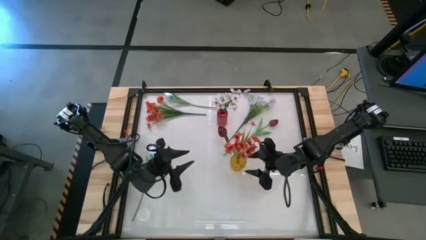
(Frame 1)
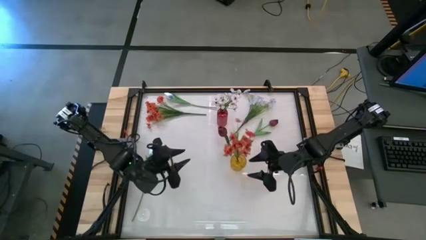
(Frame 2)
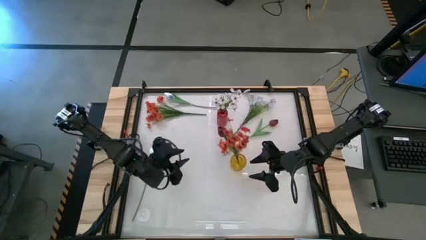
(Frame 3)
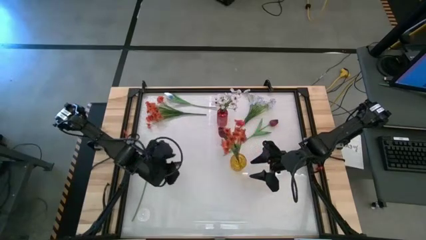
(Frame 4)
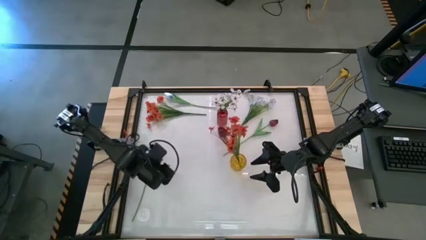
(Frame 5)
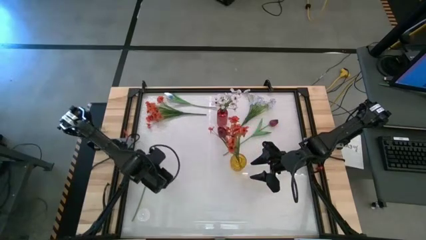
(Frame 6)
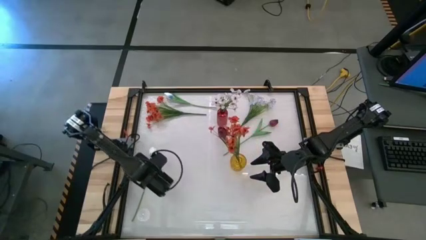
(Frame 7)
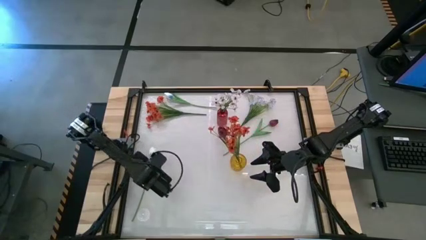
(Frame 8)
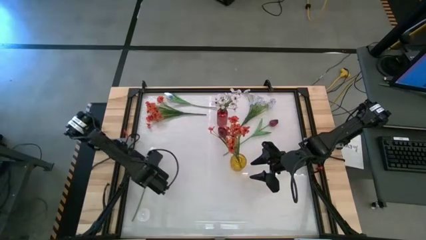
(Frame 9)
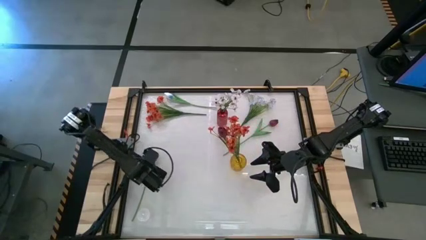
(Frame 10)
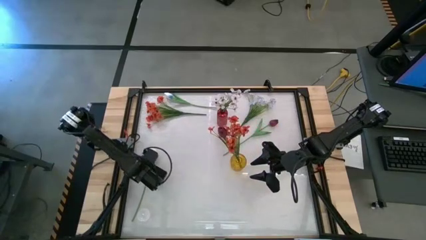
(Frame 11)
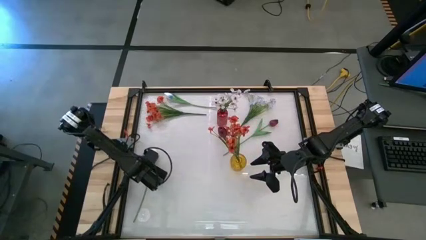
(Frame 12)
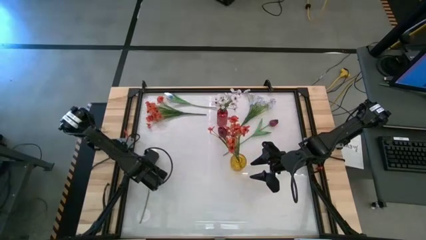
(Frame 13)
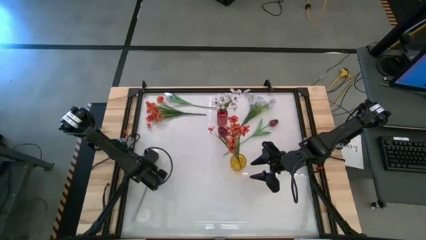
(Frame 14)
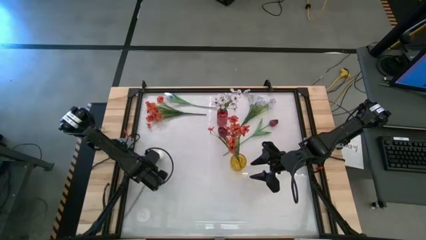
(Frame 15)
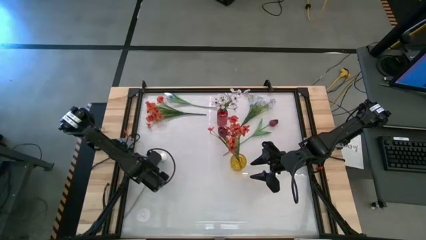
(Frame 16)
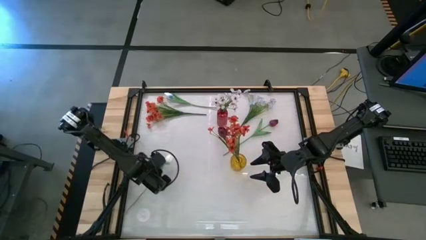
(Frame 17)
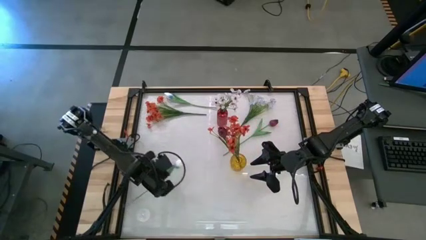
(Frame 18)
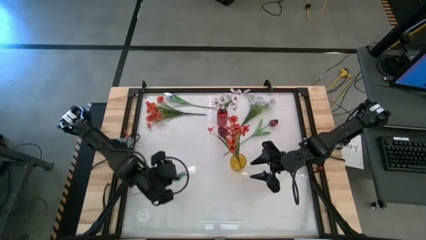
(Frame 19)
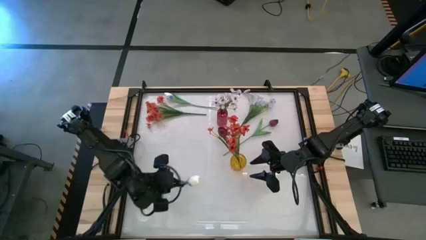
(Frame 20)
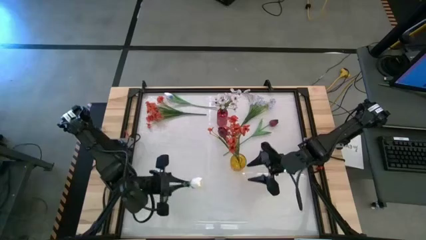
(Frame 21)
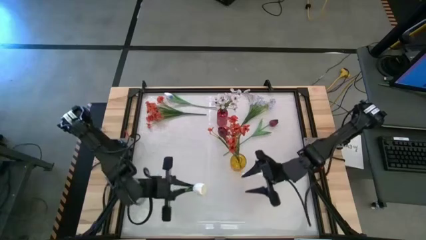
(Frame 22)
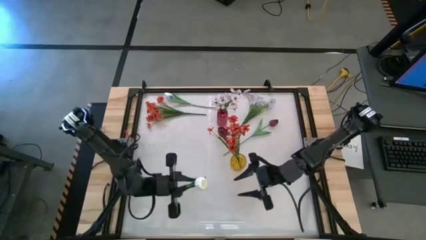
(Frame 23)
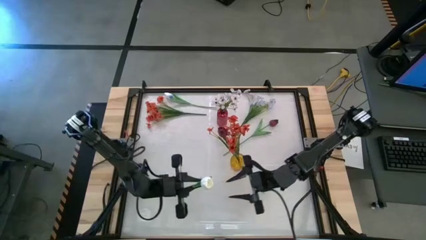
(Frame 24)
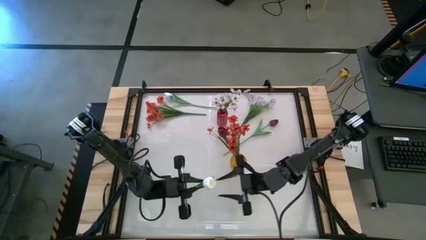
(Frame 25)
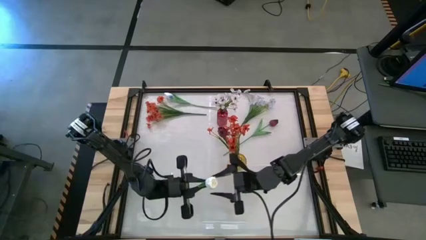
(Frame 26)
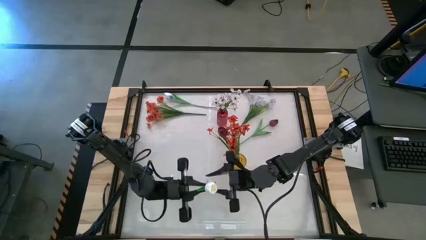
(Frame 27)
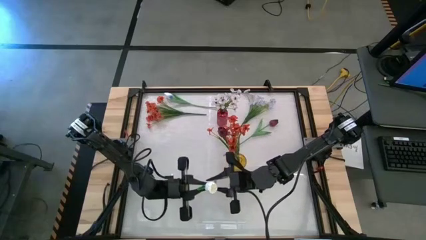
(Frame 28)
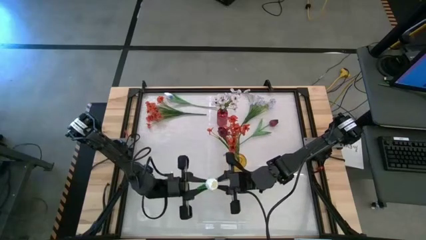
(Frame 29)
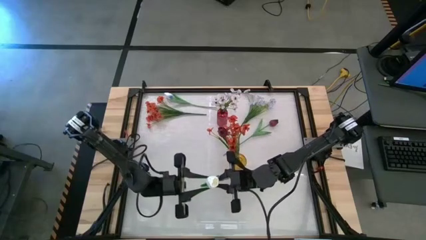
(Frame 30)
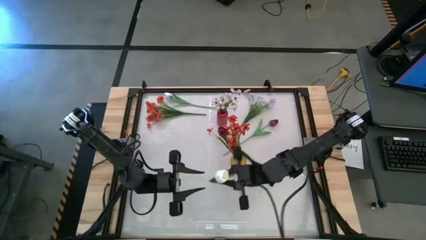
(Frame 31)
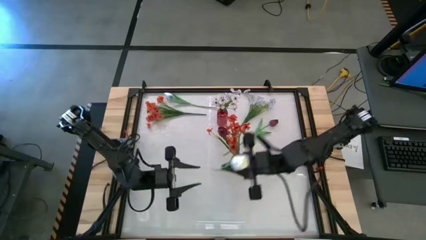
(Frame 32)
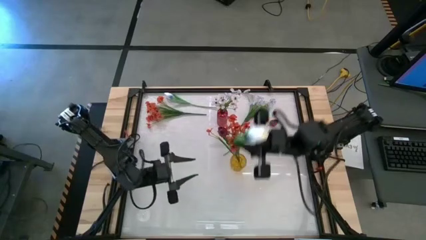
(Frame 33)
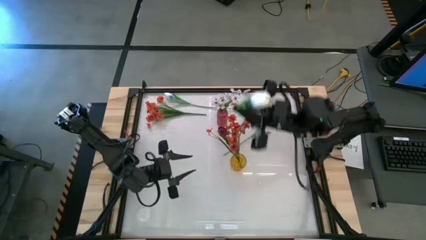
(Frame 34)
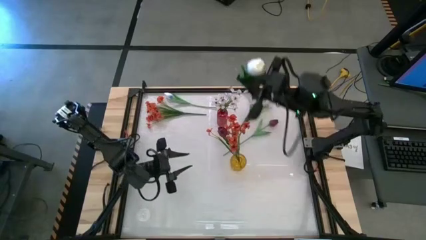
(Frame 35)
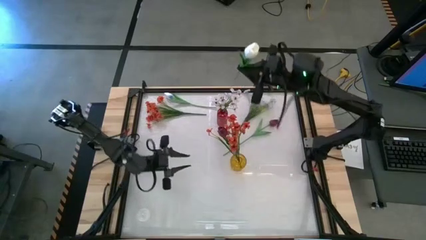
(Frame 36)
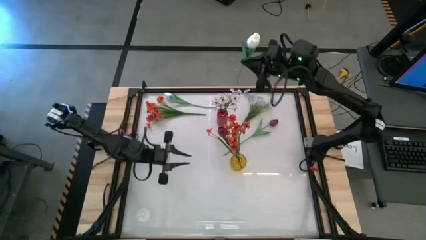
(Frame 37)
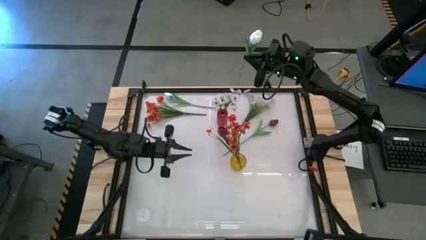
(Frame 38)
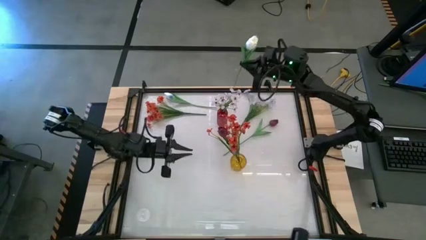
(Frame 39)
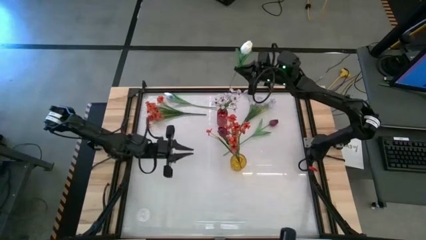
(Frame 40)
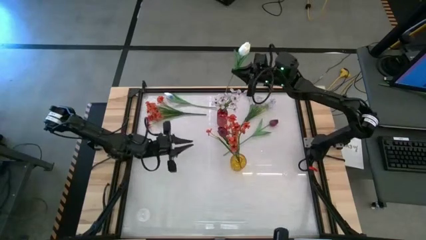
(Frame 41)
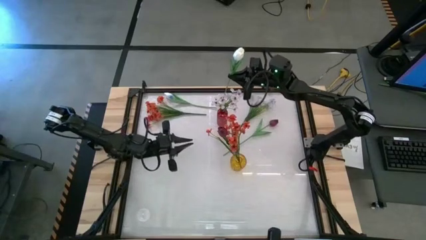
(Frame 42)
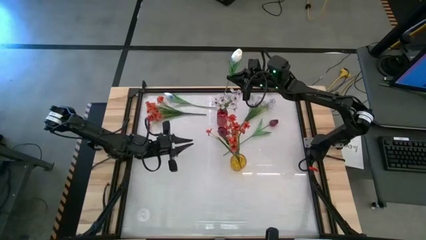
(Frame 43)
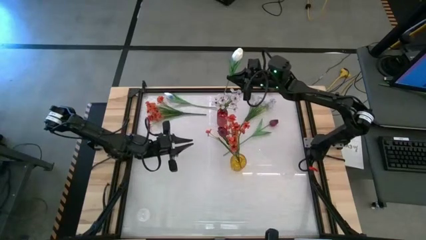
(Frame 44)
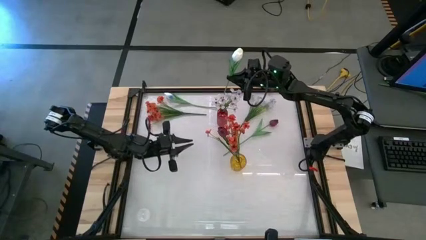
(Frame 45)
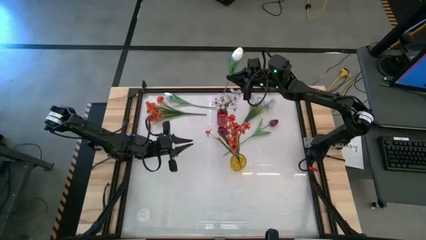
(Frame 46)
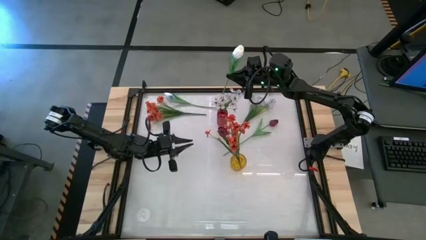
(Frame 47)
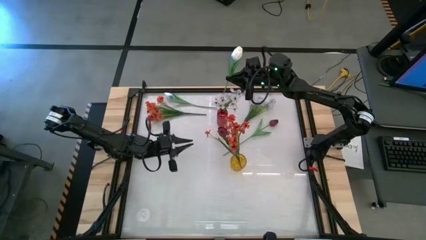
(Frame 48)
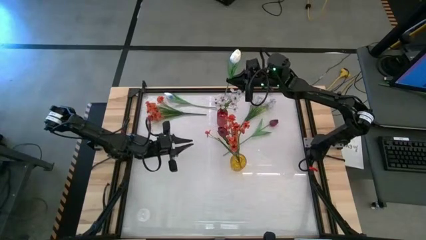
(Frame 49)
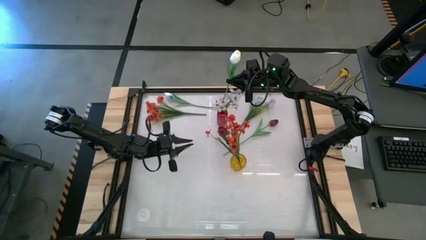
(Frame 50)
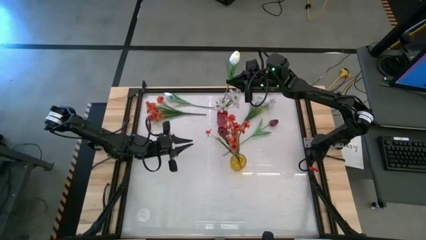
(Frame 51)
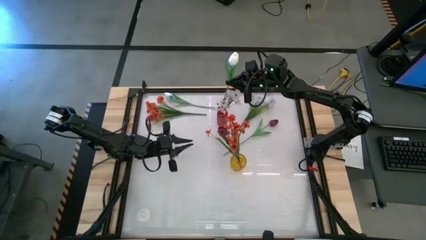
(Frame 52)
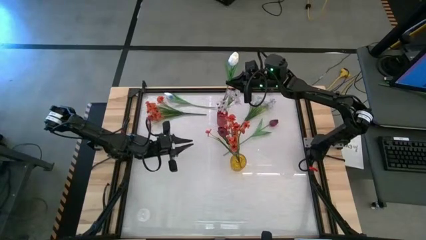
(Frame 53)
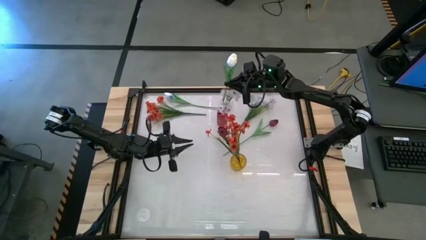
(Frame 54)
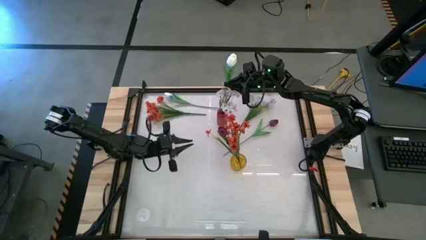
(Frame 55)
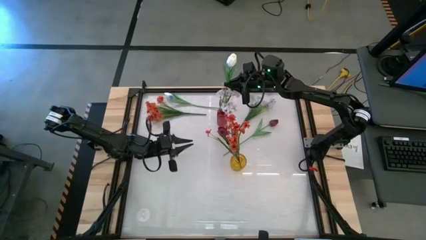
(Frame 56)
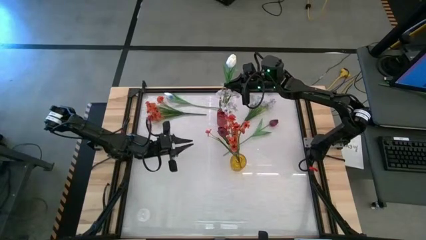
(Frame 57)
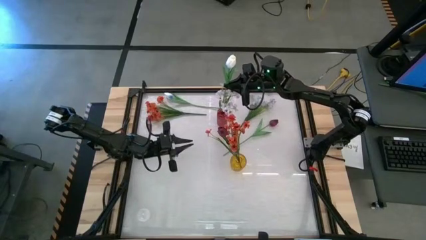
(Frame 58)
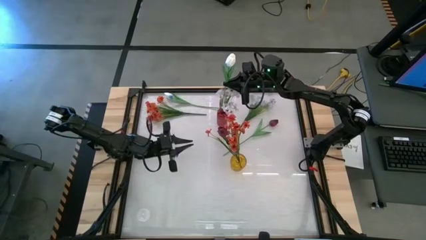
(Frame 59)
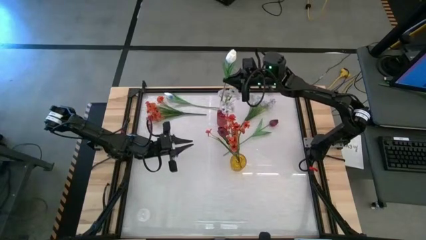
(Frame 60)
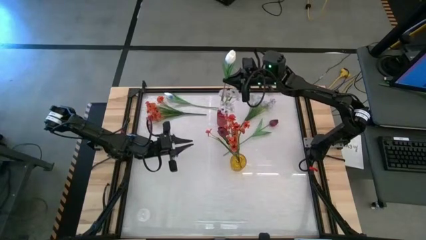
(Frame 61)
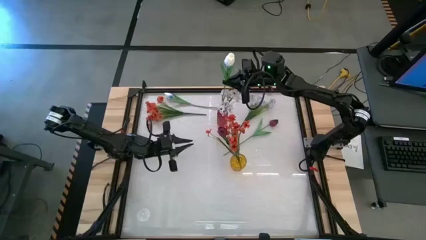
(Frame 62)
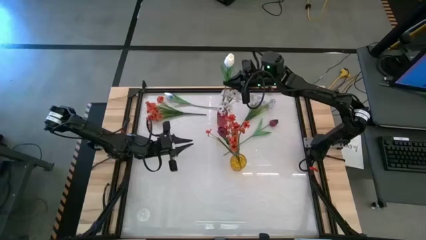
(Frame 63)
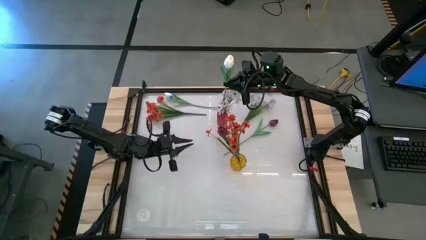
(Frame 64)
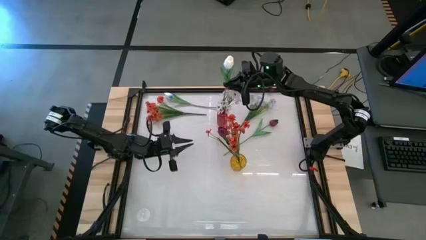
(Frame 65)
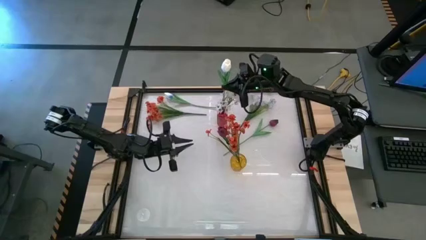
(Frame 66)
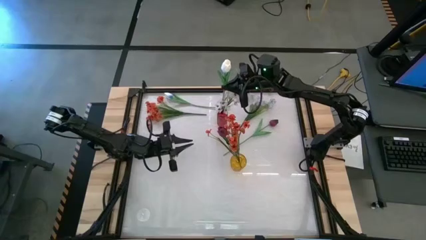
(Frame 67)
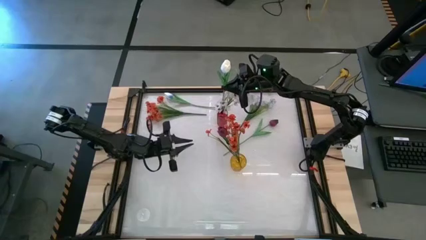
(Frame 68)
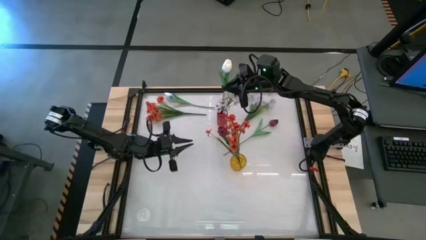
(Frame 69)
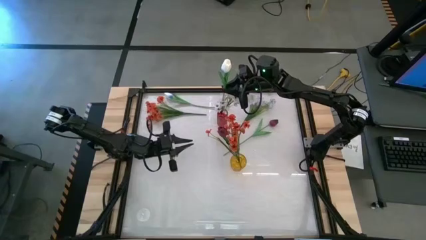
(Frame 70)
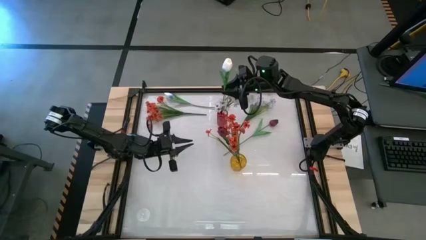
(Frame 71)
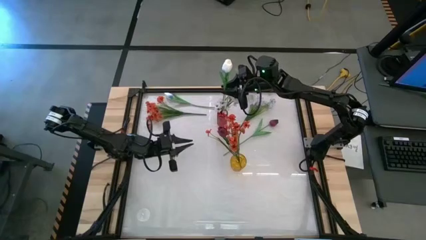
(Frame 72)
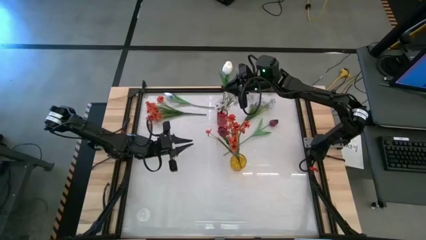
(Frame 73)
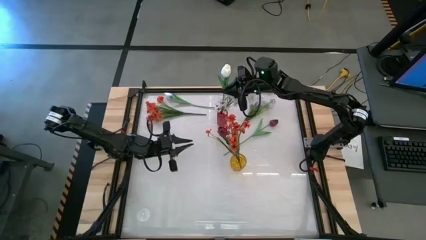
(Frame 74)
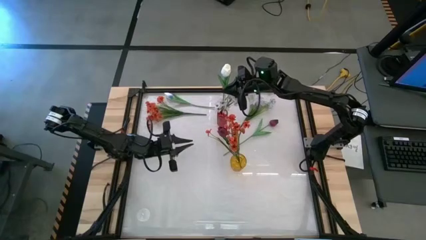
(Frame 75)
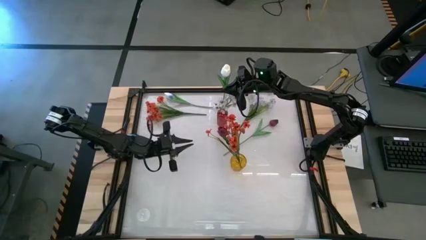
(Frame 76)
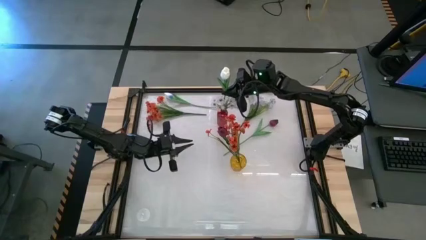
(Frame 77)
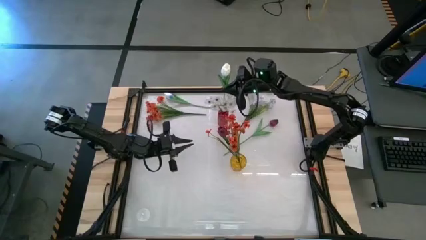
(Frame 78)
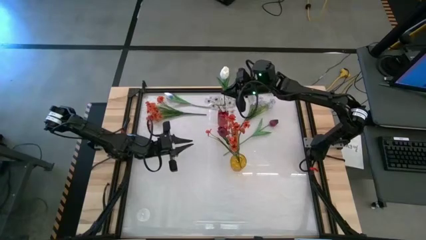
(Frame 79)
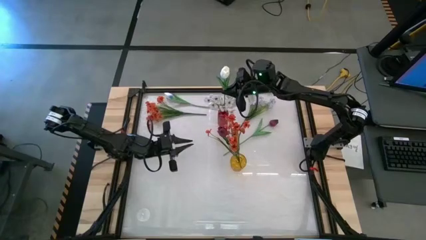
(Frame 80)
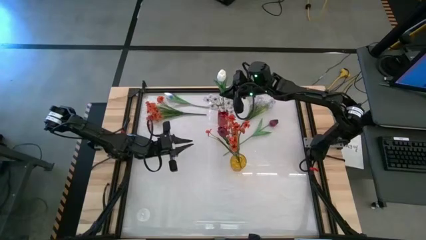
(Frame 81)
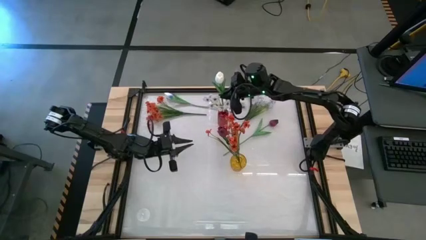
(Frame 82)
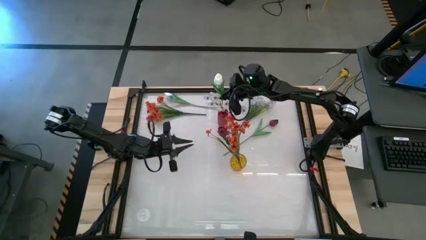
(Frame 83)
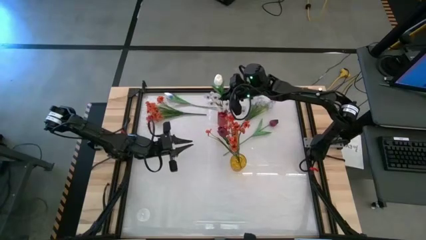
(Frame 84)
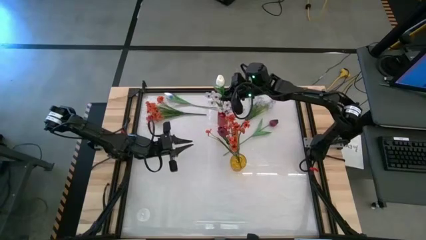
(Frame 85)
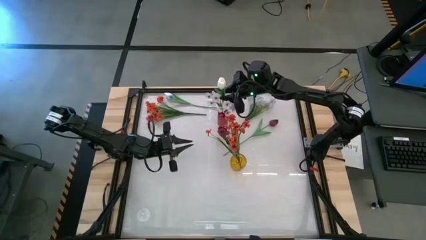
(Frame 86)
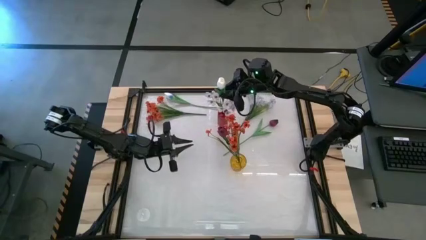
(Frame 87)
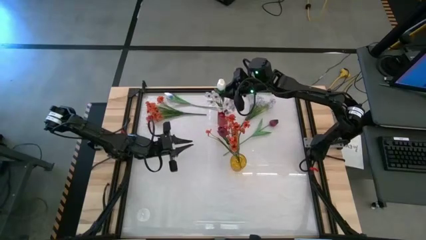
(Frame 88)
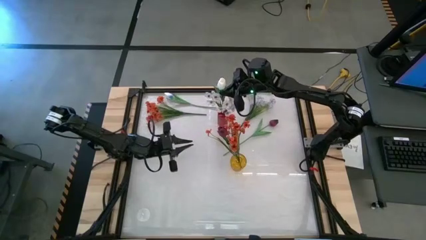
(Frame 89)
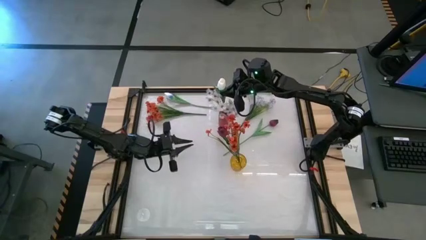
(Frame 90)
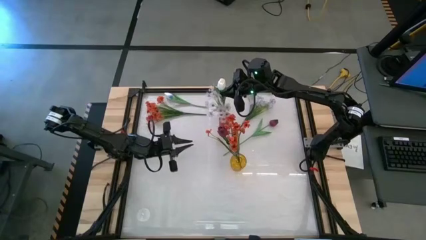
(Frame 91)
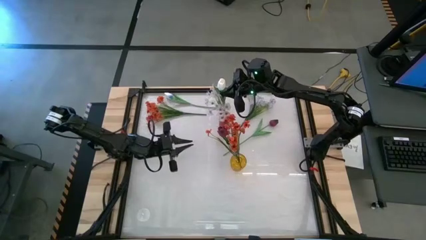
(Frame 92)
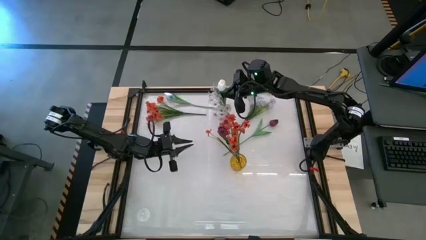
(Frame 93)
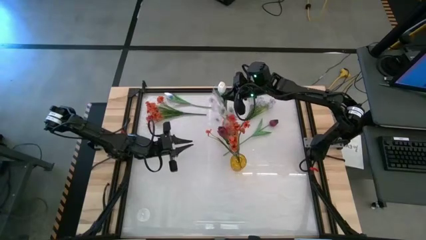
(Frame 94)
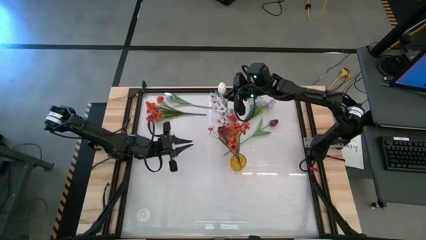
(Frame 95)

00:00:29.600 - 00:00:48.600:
Task: Sort flowers into vase by color
Put the bottom white flower into the red vase
